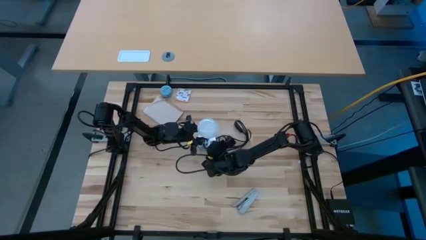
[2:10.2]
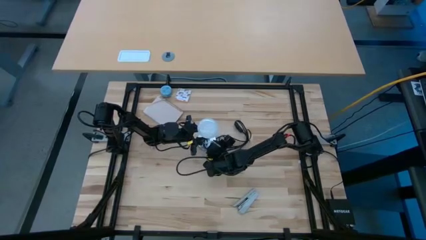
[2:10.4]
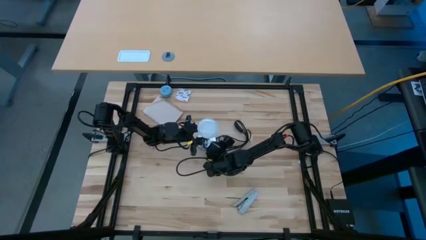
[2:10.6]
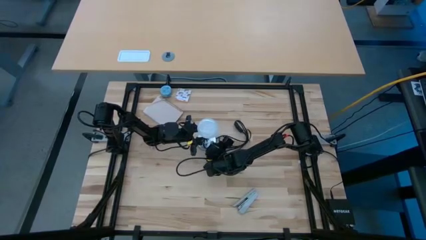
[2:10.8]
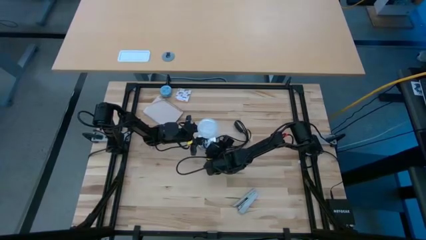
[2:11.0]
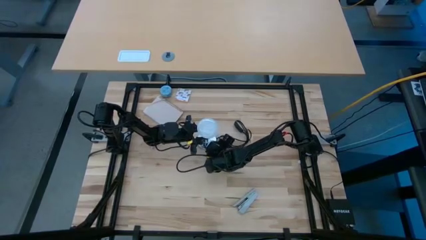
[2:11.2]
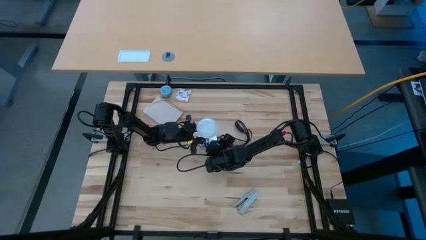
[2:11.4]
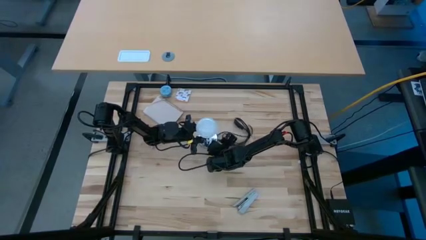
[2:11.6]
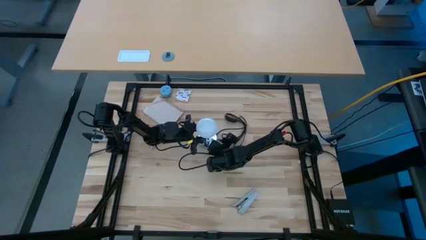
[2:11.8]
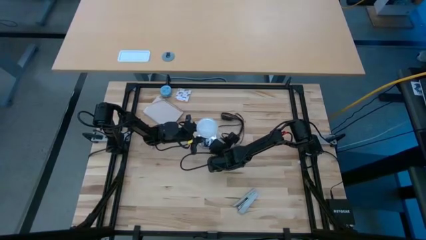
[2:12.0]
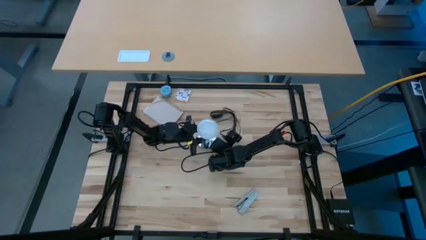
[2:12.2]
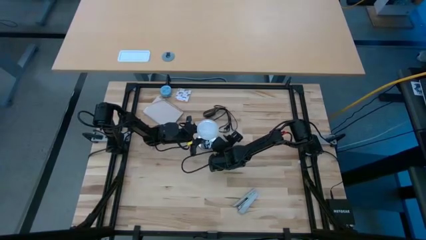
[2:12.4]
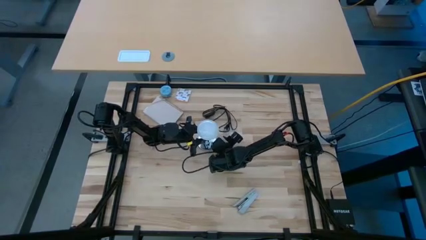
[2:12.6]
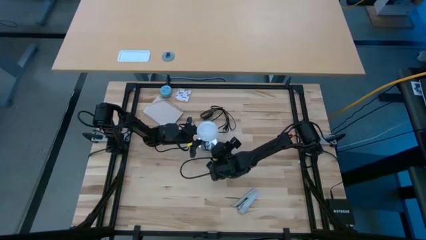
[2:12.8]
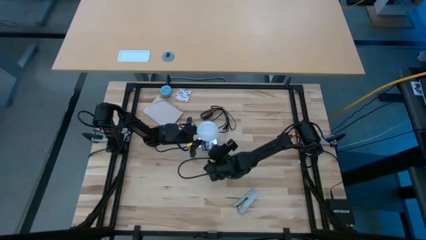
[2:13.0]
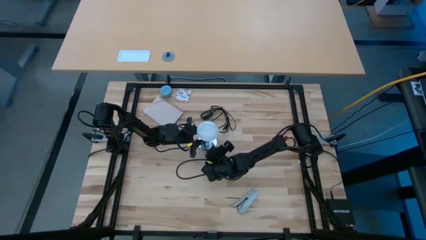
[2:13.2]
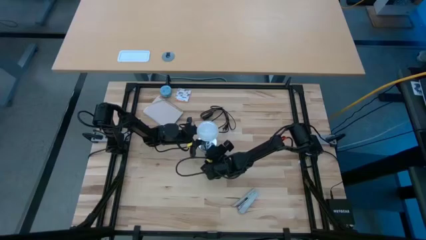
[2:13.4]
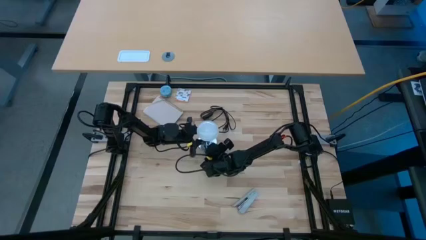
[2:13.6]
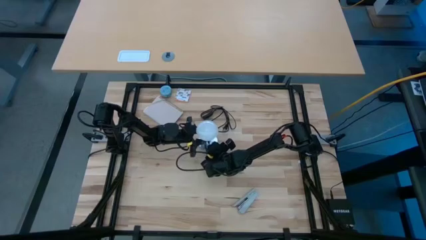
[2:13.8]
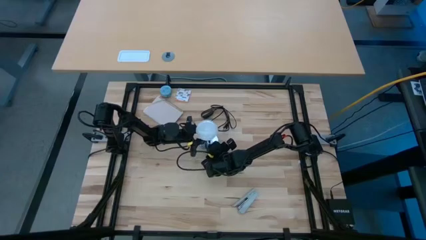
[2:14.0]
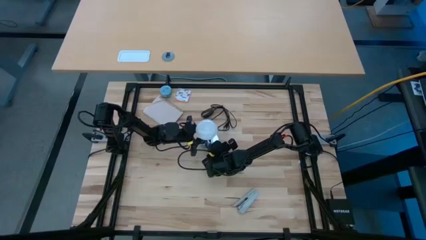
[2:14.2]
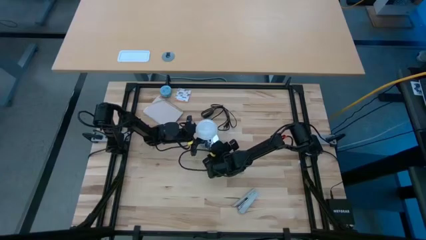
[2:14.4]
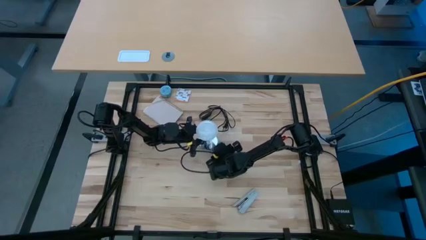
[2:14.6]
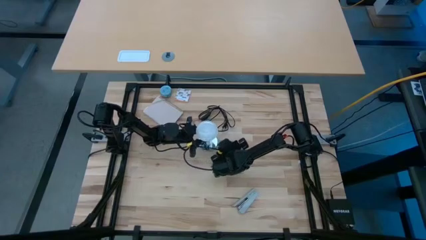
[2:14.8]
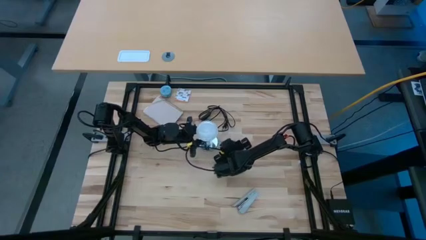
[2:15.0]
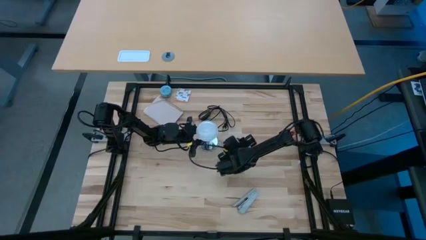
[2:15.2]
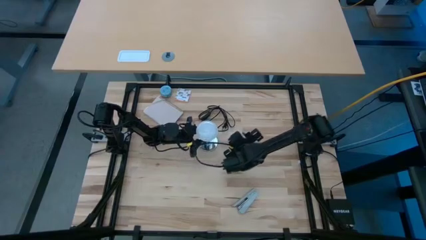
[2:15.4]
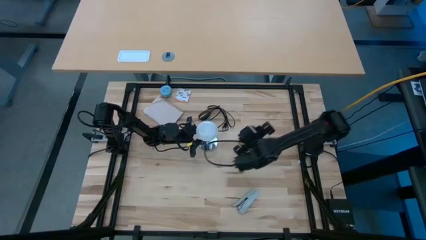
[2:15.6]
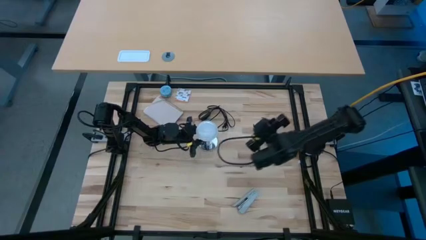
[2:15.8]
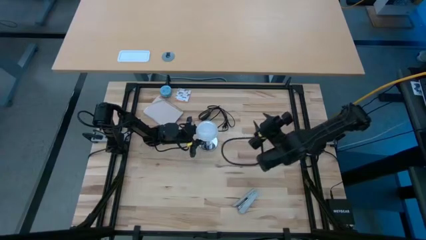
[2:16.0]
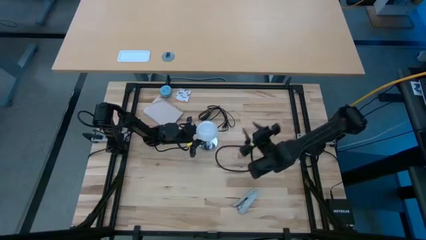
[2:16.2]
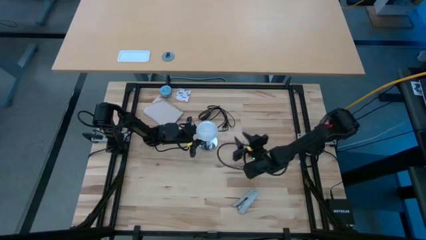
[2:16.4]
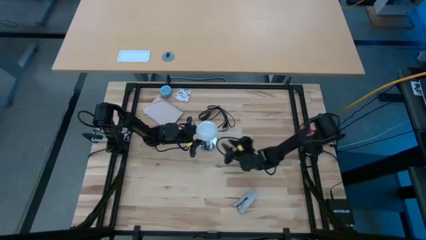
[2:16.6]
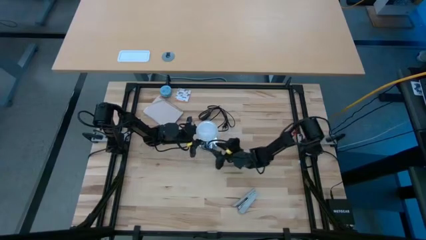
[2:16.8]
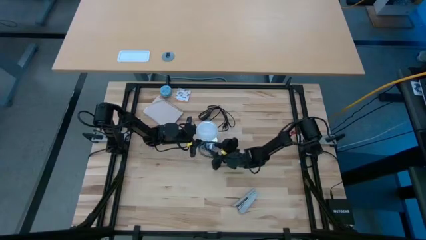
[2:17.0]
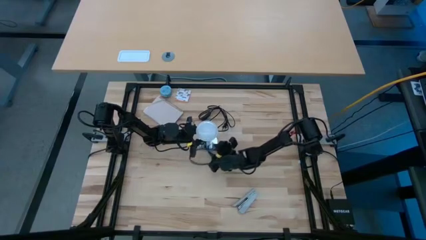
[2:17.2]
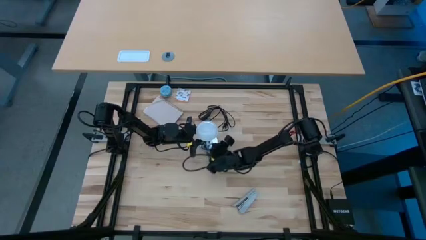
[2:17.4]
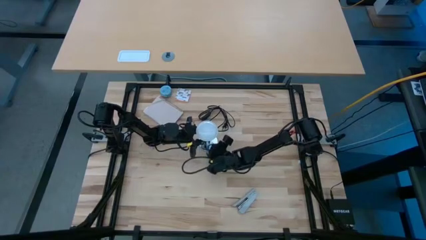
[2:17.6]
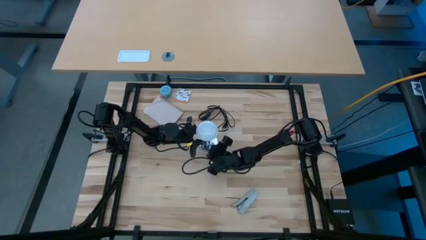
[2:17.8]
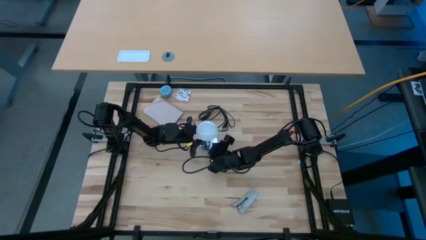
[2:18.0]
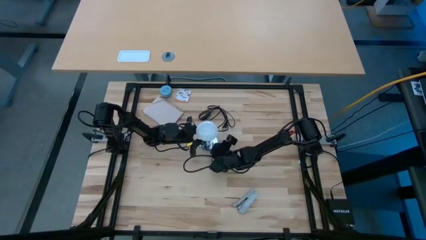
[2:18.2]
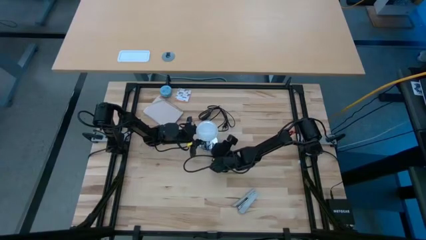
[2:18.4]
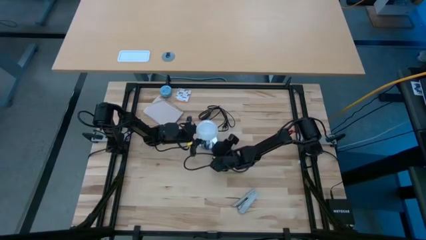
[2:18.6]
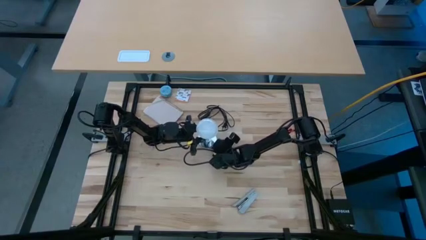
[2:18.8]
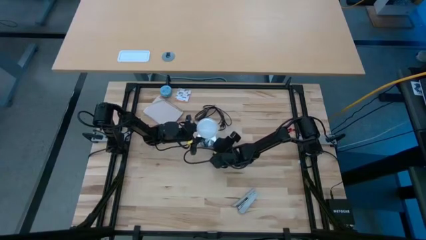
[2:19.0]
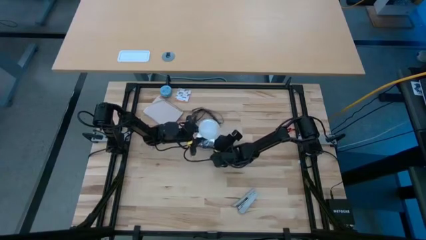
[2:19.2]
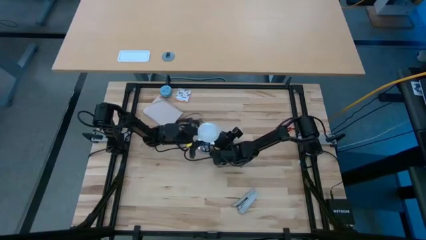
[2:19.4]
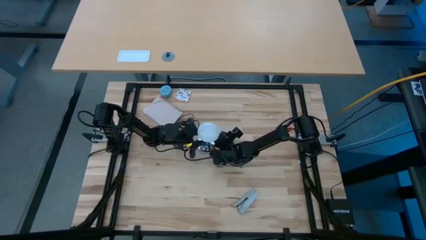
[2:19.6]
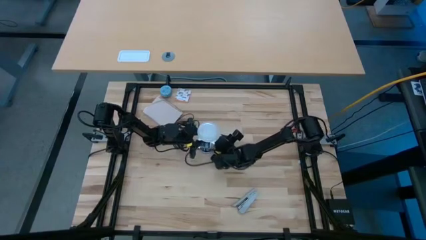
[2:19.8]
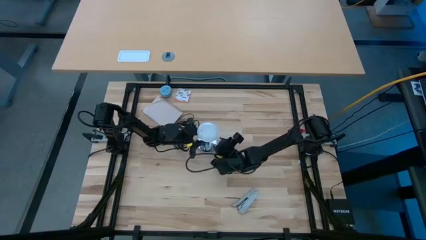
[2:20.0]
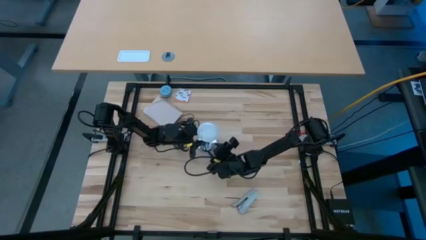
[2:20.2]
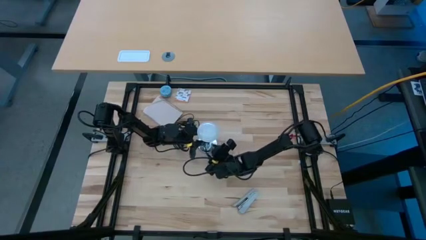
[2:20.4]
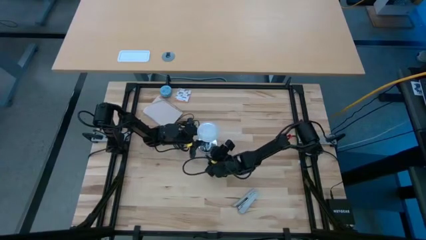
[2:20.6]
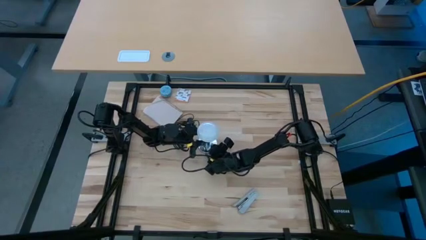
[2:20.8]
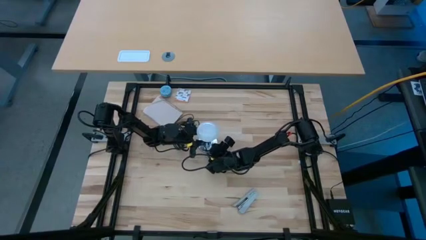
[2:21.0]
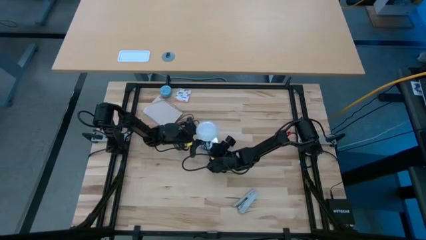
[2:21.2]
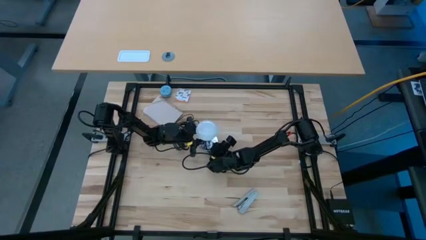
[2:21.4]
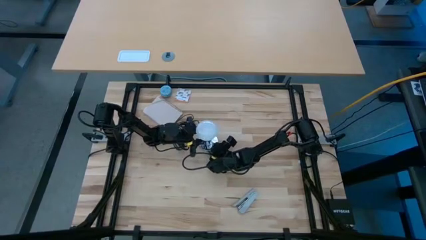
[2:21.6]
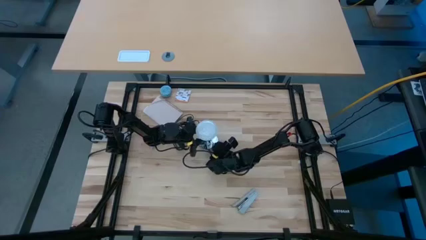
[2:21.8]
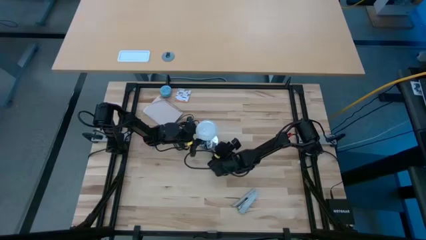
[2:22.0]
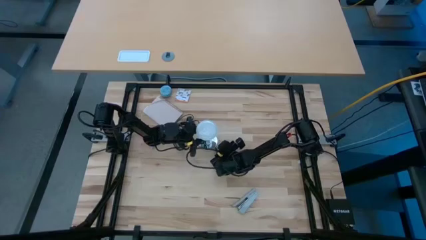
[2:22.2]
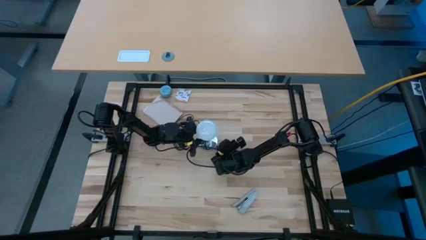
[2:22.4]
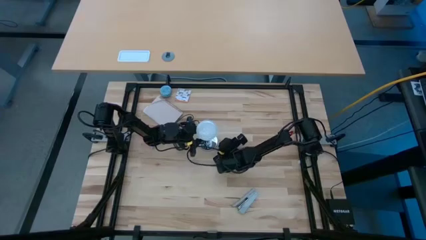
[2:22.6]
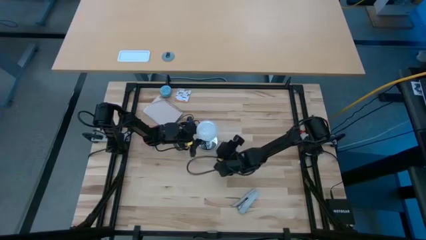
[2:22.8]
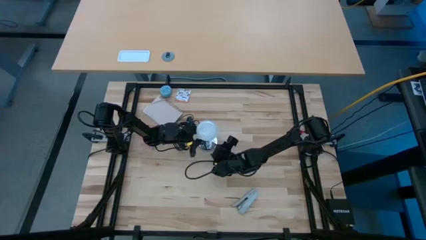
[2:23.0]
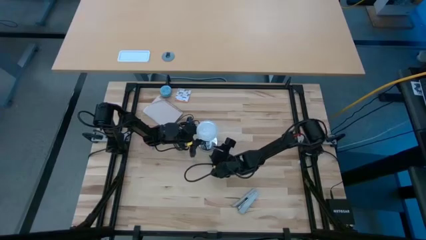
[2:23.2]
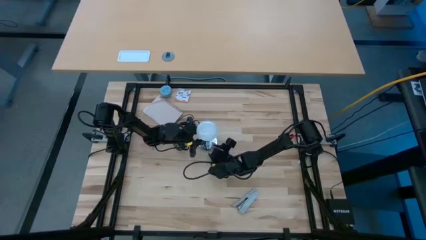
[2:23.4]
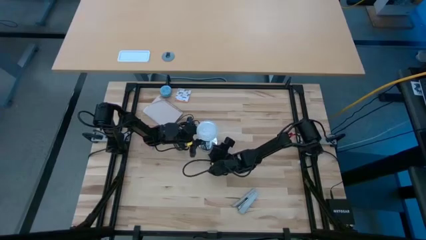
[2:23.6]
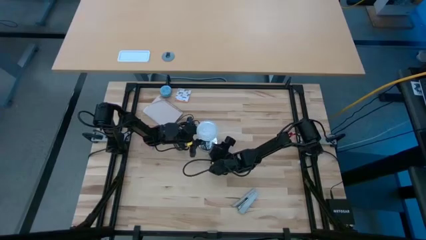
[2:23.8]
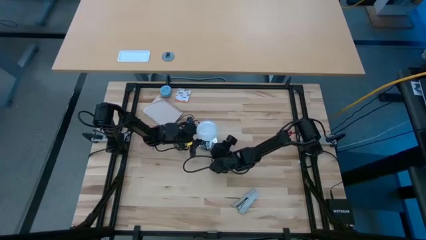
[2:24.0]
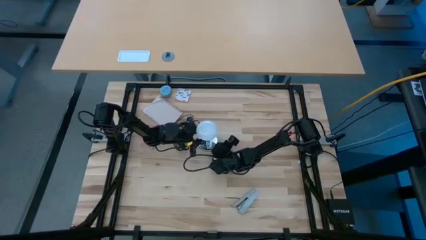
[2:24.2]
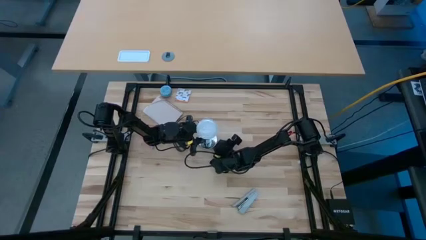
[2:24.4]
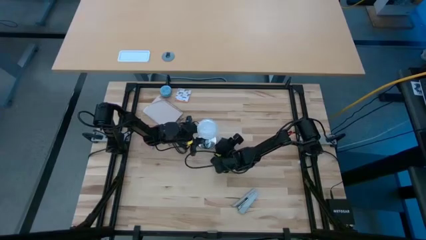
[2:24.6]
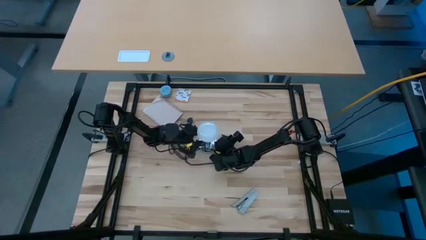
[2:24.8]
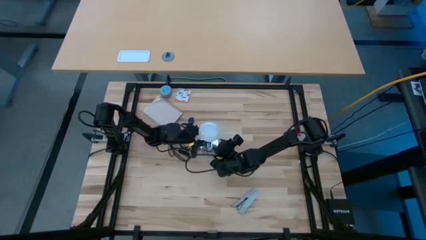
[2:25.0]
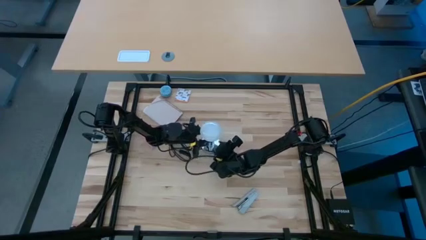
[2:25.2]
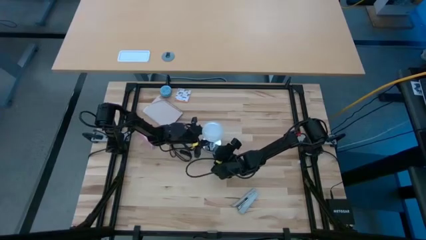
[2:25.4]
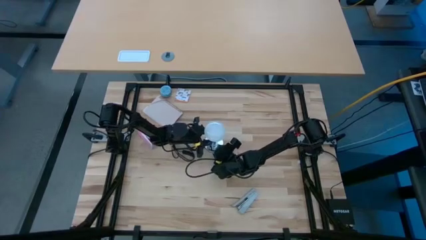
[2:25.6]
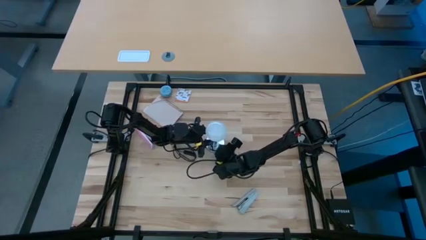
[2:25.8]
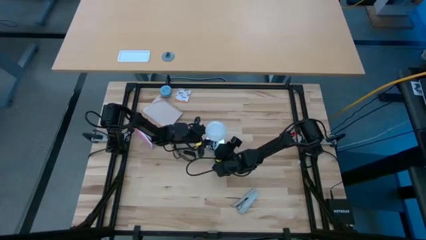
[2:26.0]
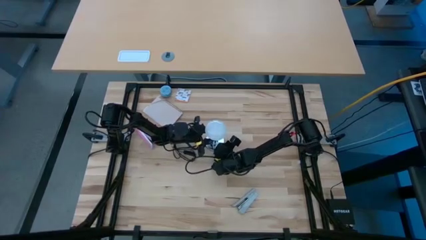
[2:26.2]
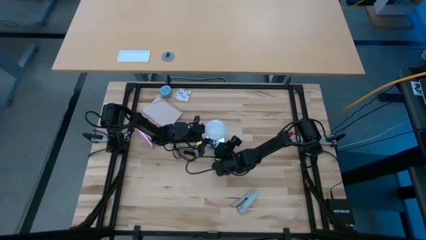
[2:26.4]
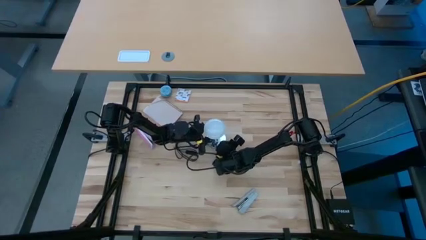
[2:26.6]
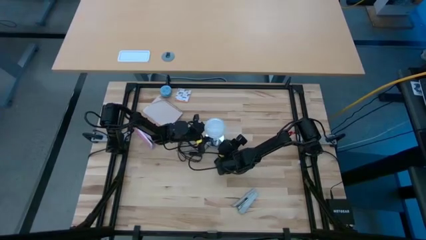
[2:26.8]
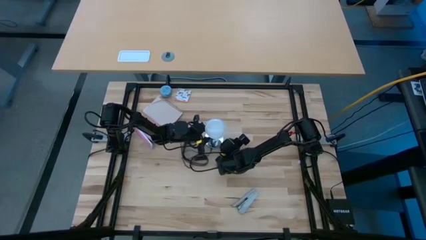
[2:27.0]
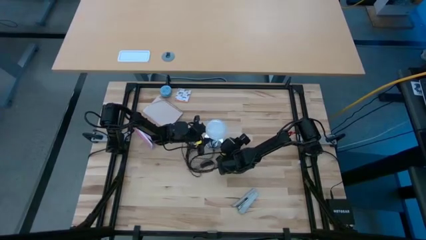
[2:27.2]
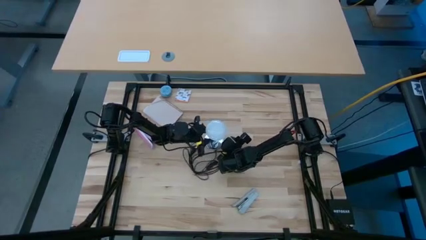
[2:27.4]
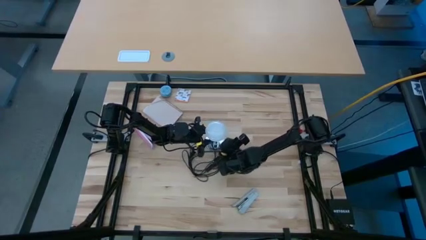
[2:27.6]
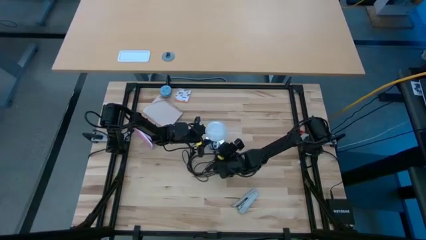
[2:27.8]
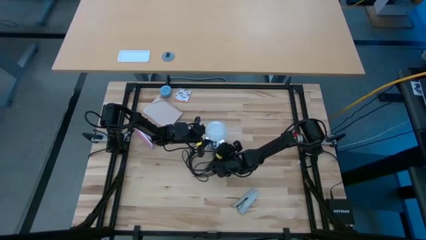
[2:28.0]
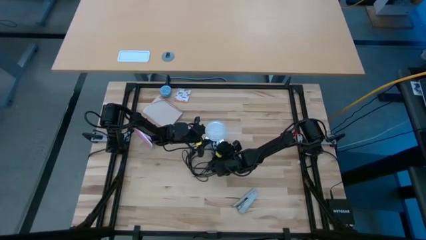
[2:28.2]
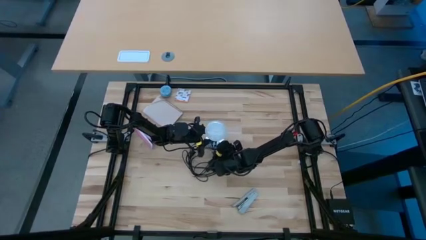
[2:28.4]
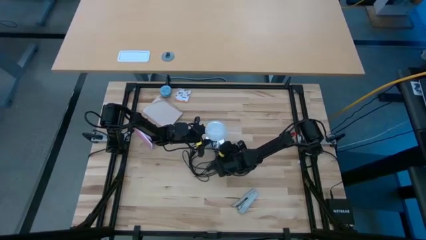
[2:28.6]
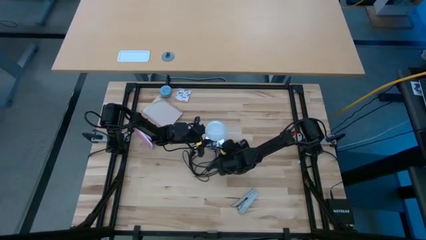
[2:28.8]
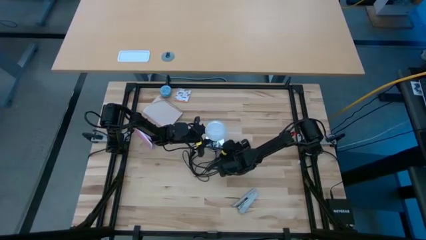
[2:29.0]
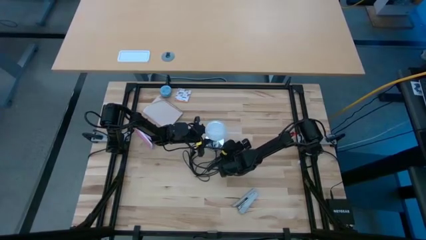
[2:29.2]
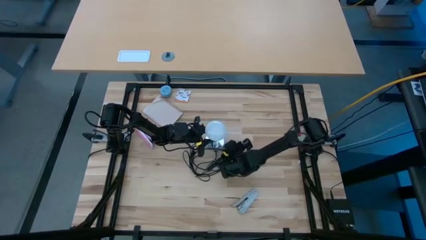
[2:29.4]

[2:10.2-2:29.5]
Task: Screw lightbulb
Insert the light bulb into the lamp
